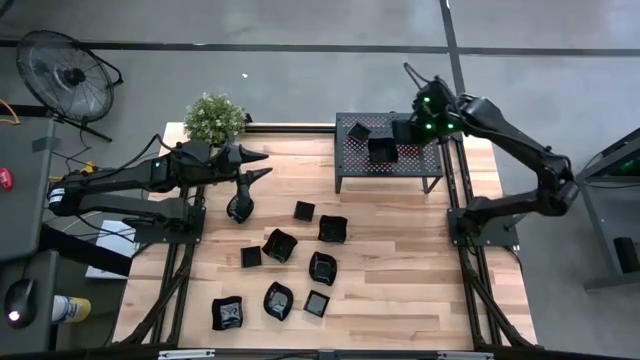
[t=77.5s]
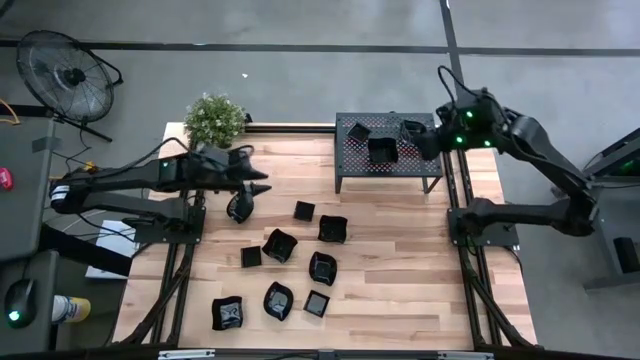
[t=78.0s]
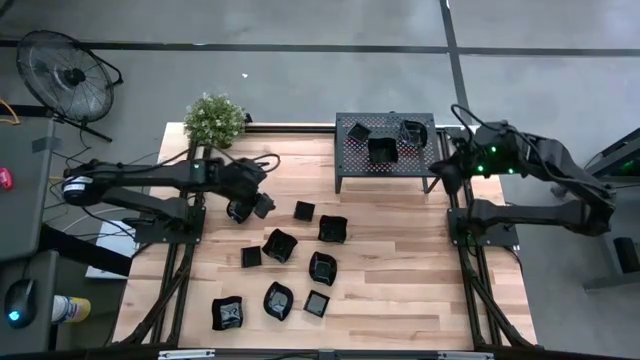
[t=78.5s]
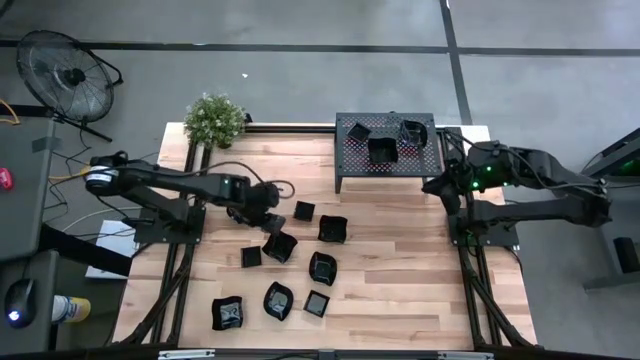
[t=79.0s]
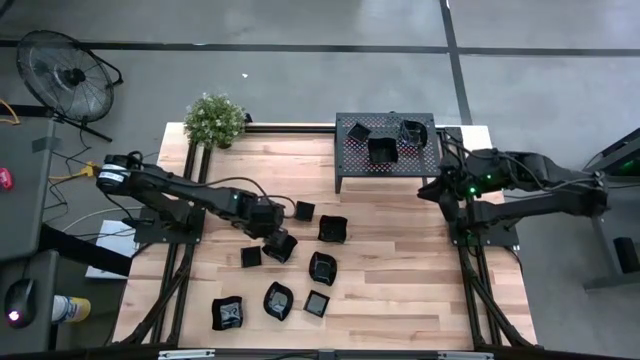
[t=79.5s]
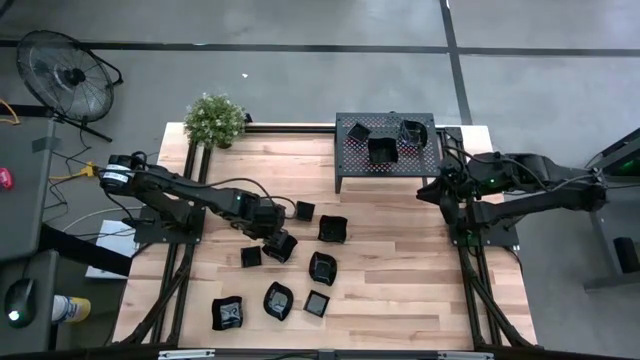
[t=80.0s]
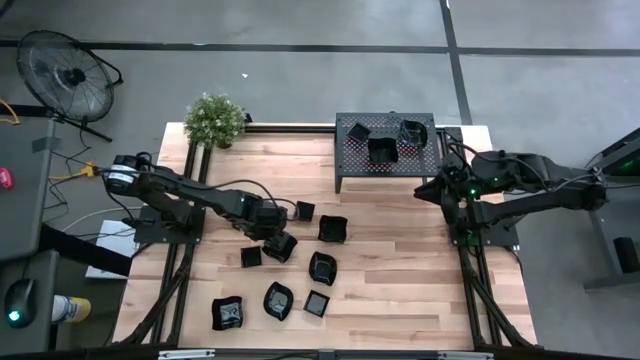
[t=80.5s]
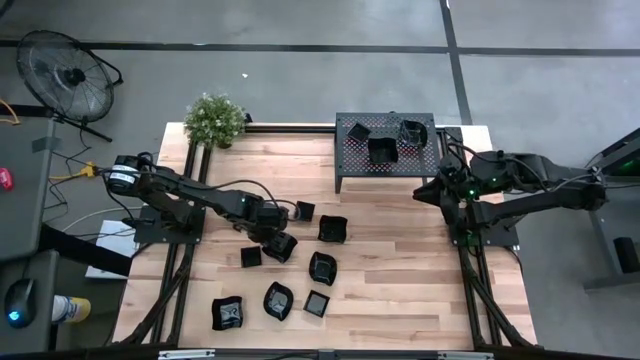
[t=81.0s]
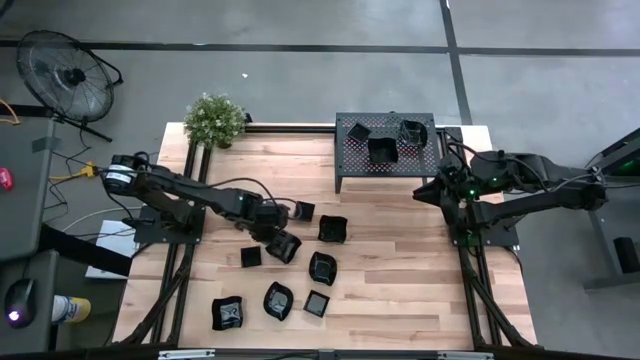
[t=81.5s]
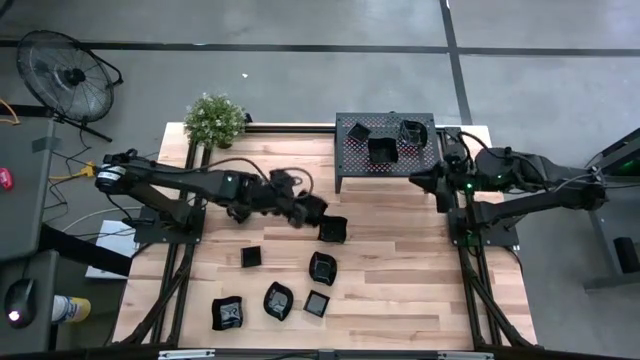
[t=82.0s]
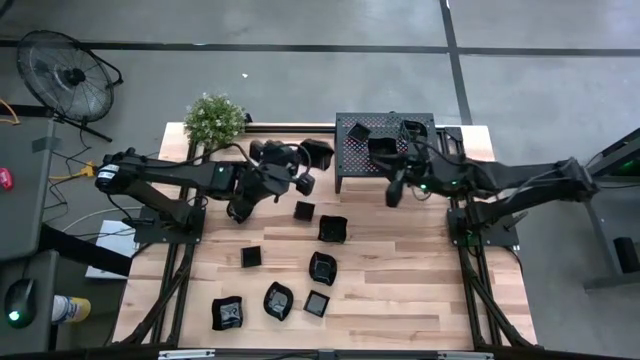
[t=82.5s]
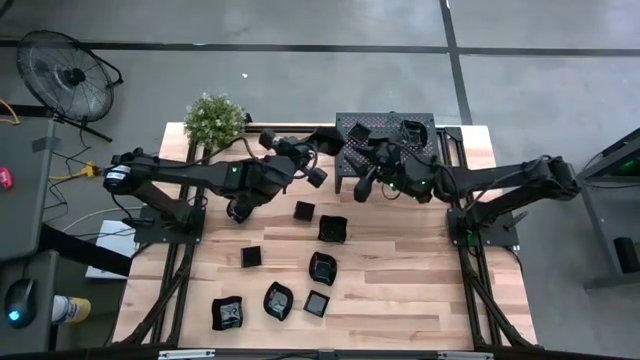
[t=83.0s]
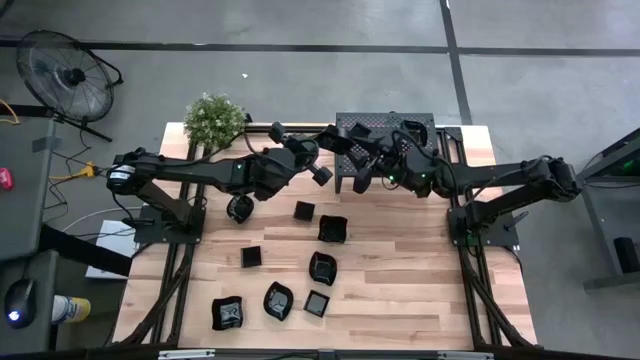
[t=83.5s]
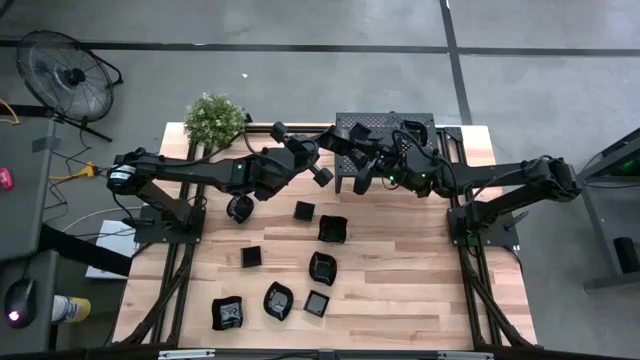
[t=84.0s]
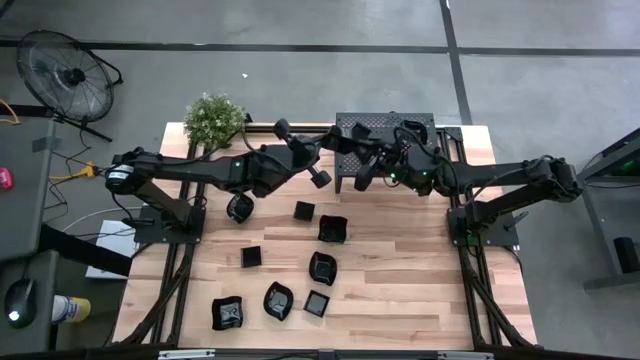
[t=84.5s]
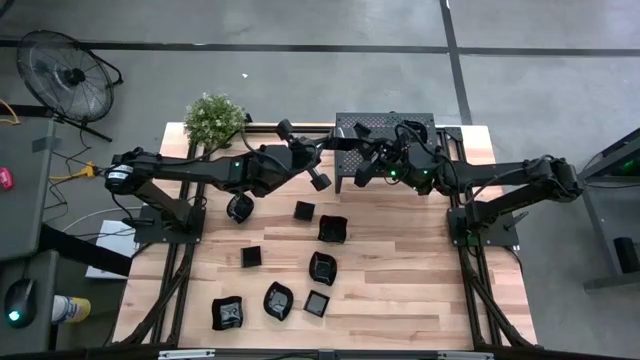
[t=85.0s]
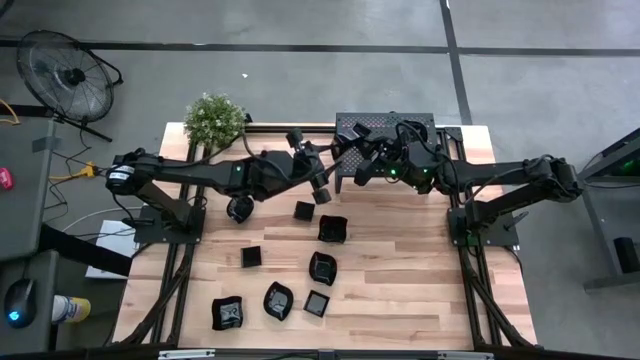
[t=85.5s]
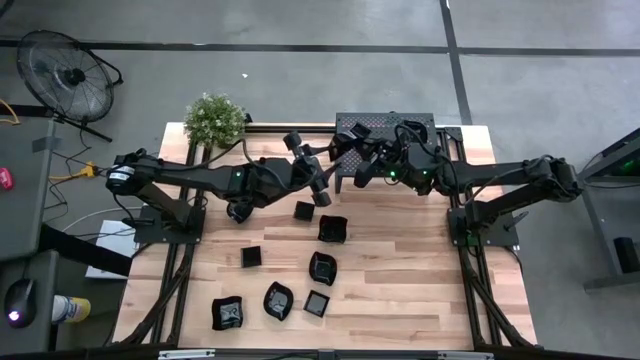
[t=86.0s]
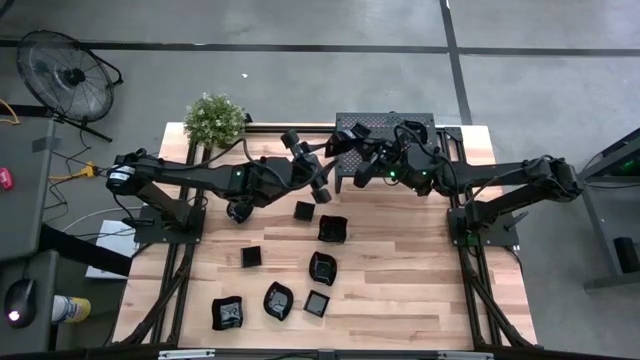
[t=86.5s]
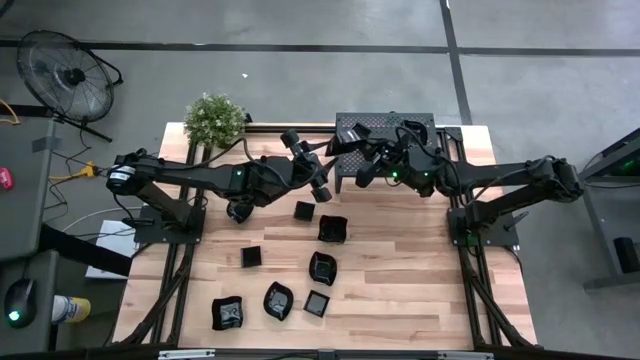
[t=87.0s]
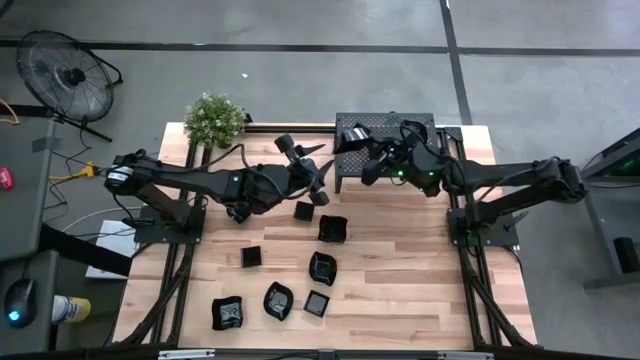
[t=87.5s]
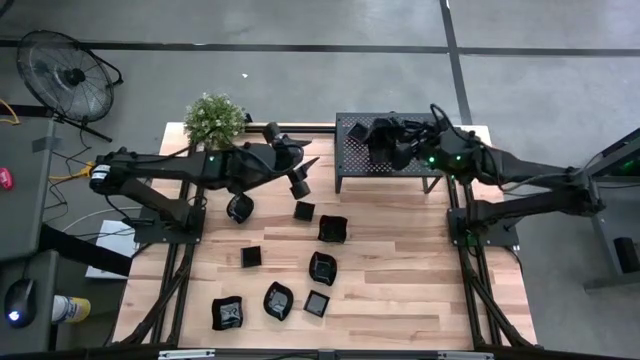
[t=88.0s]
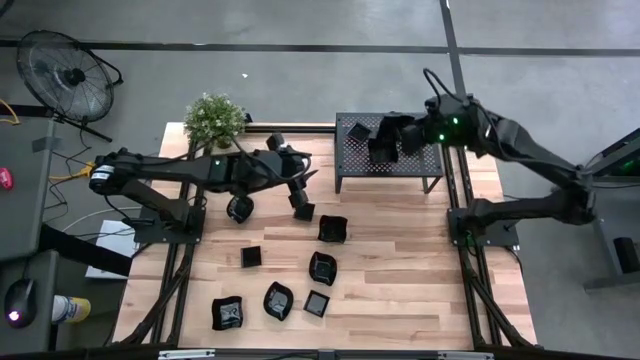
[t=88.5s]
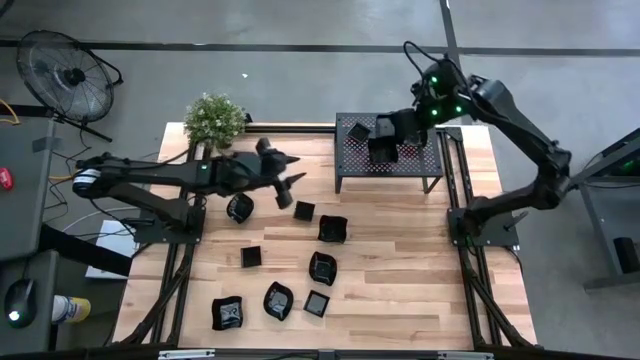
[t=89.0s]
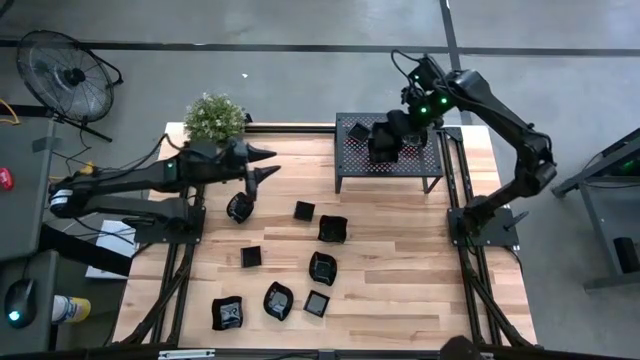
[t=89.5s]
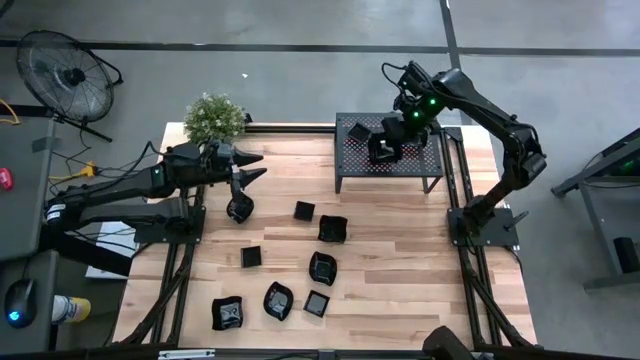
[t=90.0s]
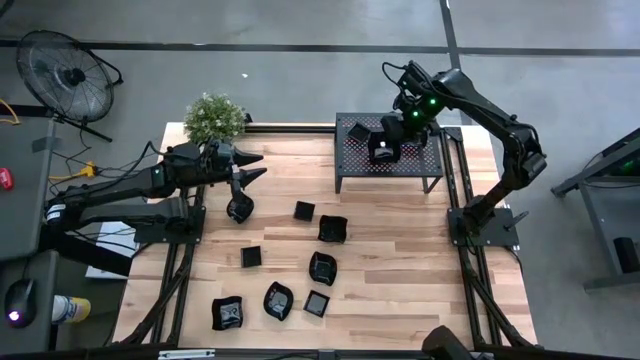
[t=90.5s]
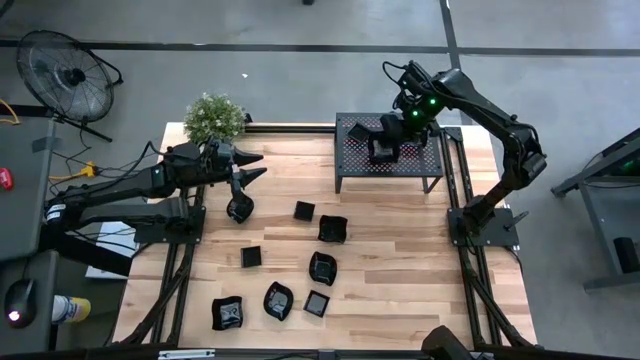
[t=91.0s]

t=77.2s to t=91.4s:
Task: Pick & Place Mini shaped plates
Stack the black distorted square plate on top of the black distorted square plates on the shelf

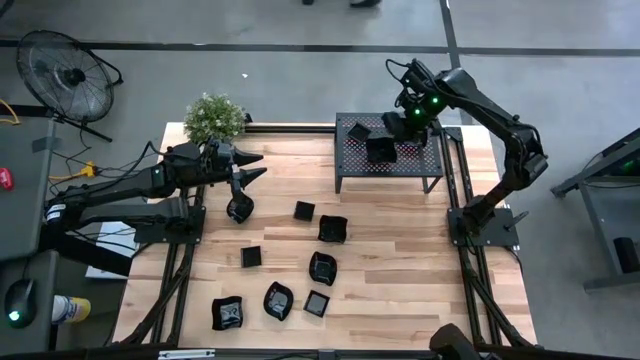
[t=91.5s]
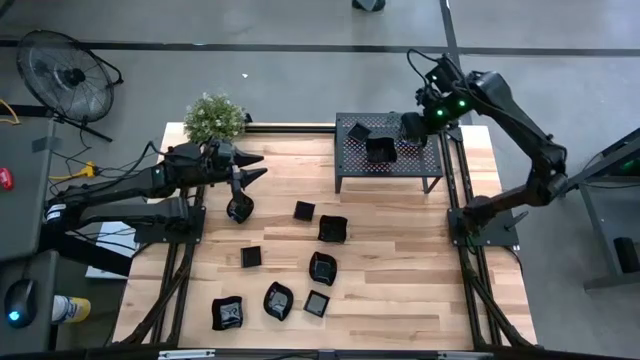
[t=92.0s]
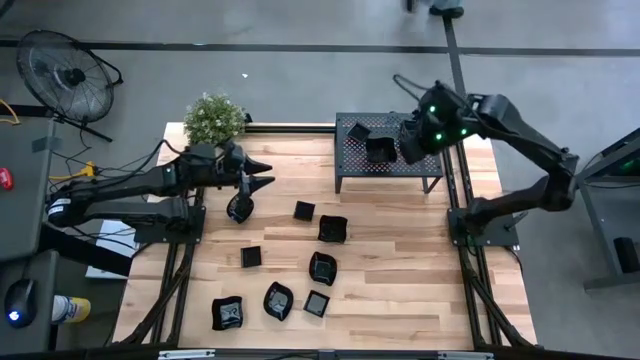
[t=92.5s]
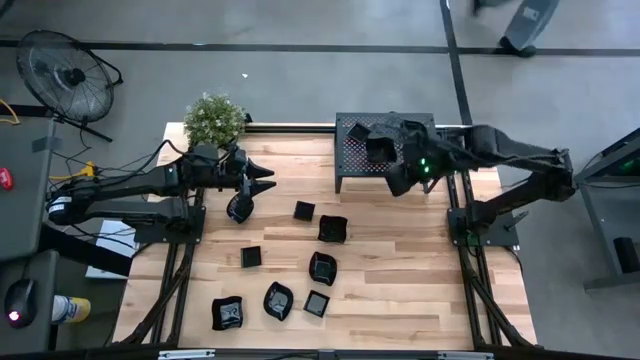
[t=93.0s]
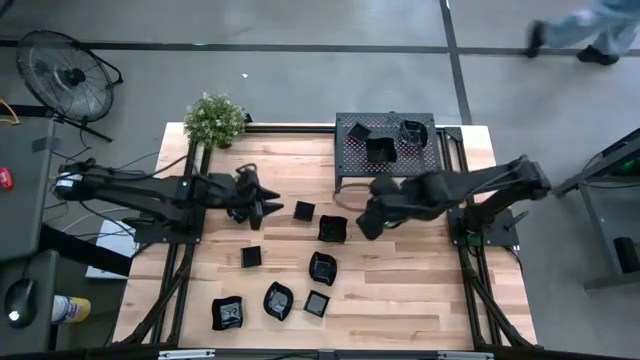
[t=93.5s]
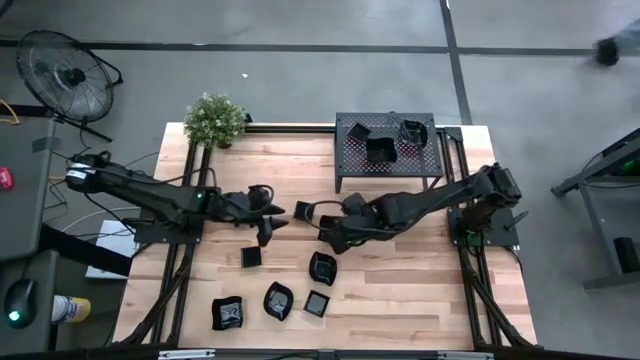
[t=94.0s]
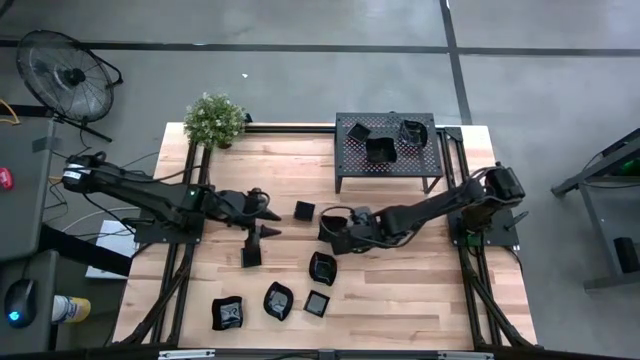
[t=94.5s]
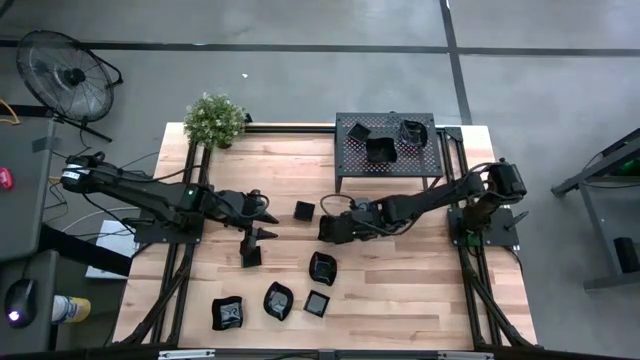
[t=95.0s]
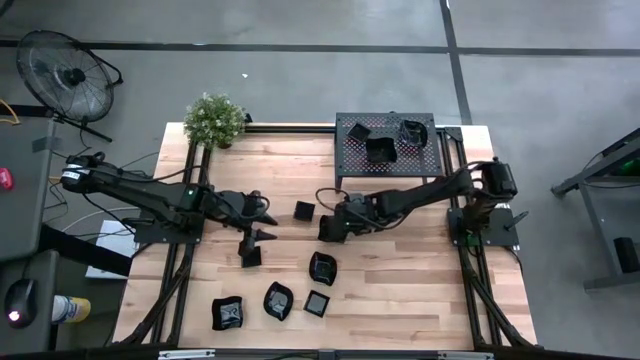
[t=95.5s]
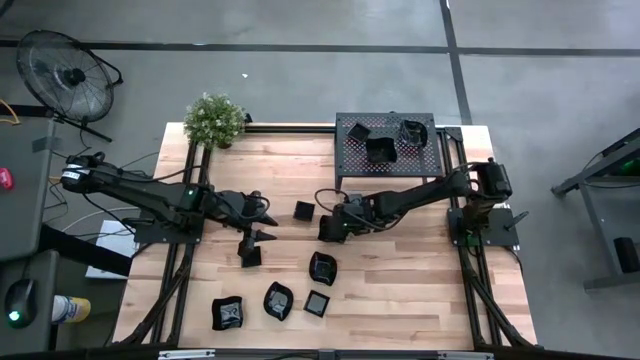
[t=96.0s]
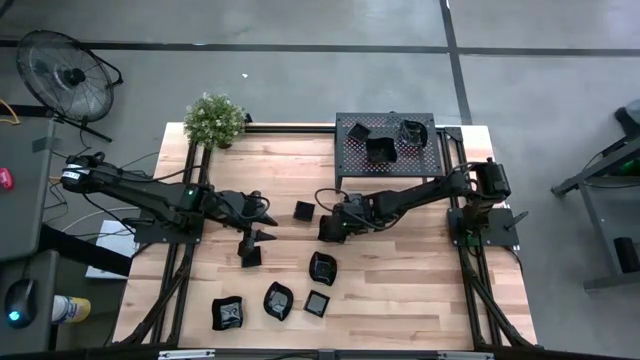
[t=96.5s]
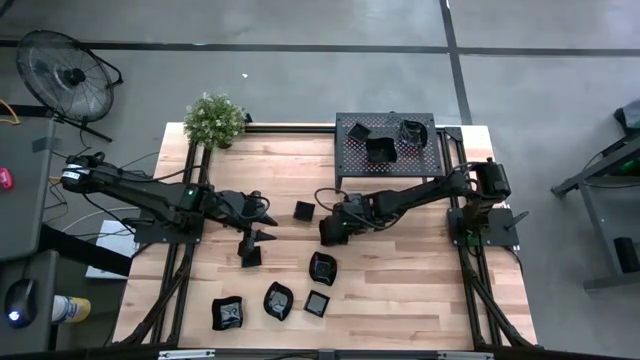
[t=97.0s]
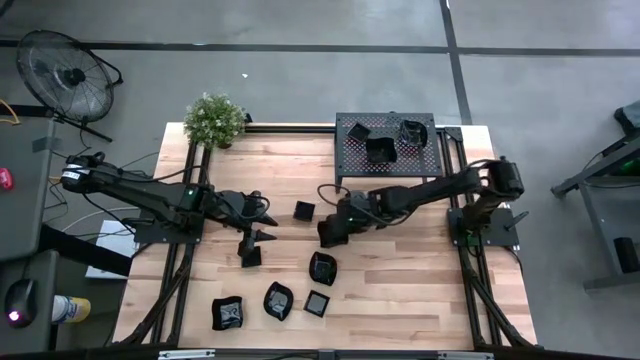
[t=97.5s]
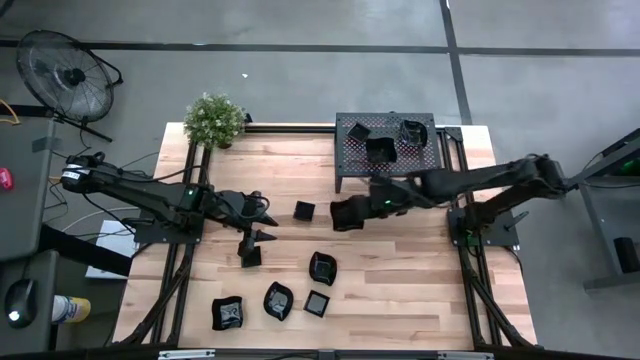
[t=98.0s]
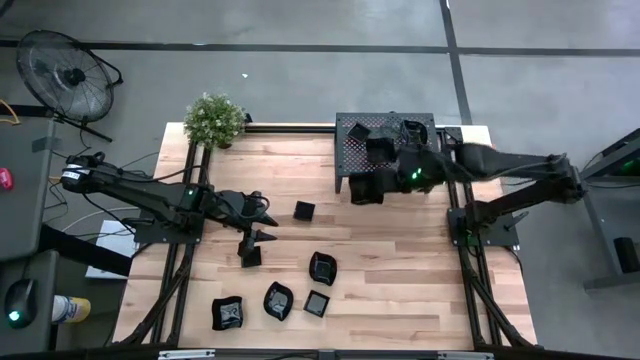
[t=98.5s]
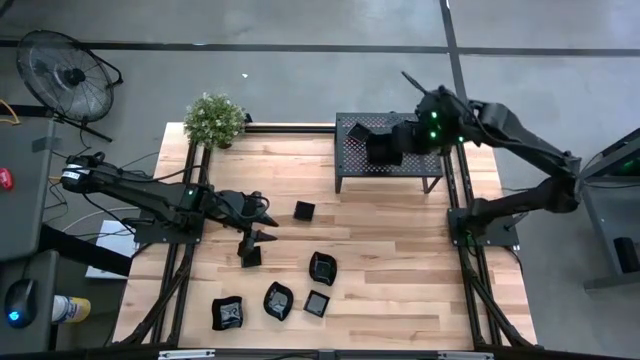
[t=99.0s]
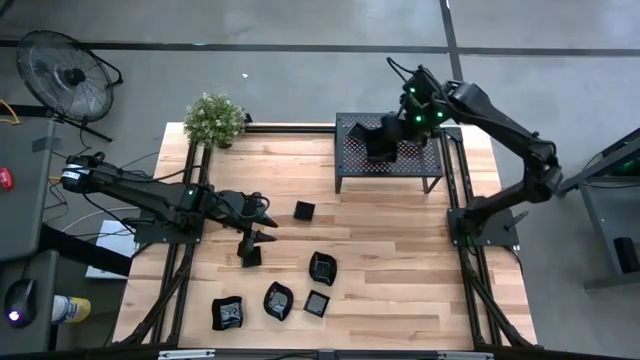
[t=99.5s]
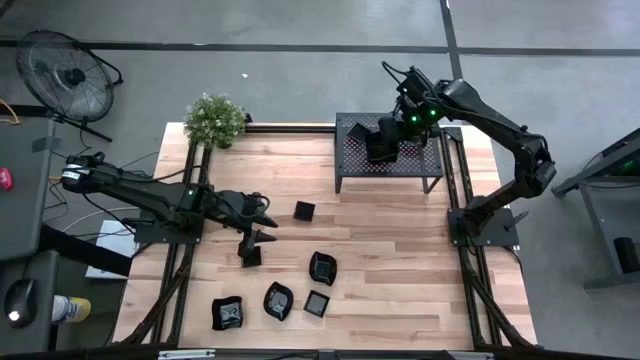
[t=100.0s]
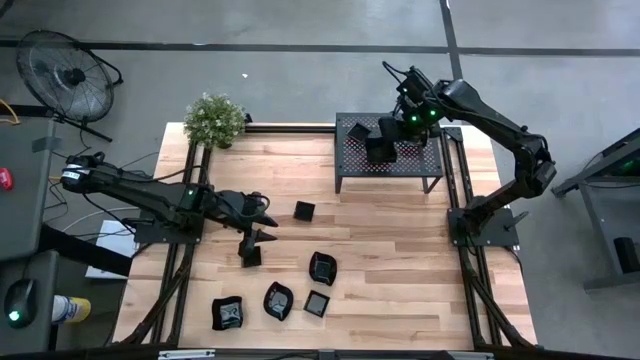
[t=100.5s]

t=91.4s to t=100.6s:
Stack the black distorted square plate on top of the black distorted square plates on the shelf
